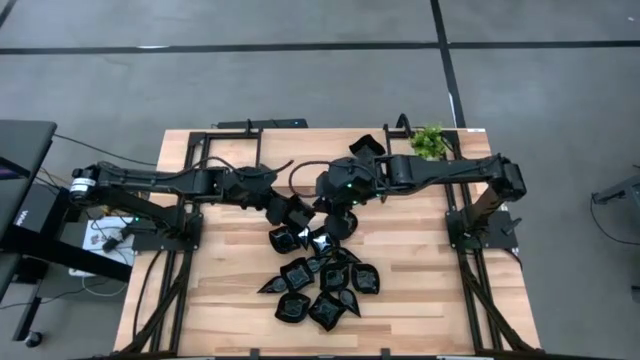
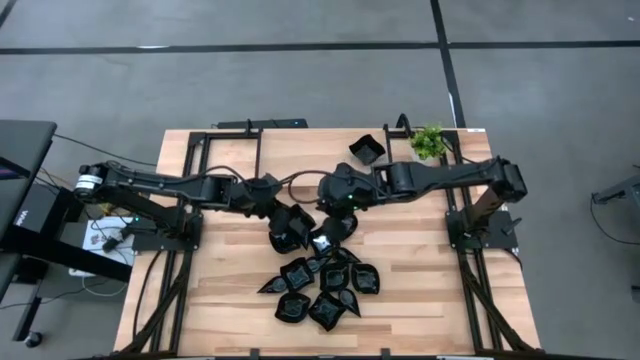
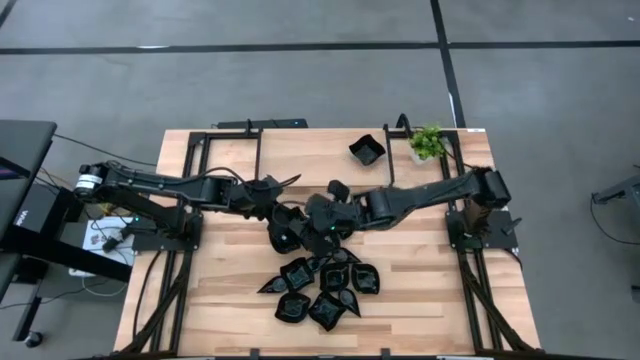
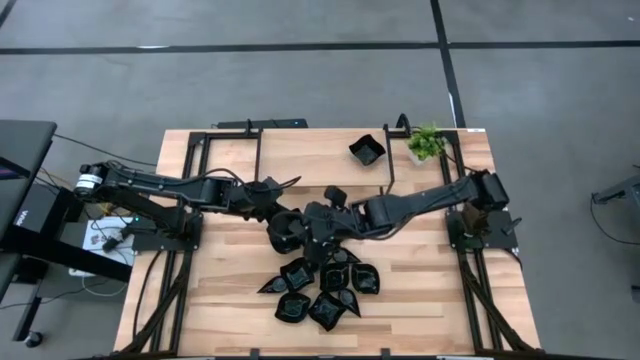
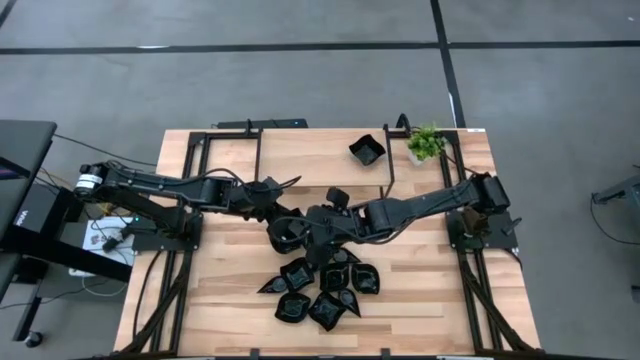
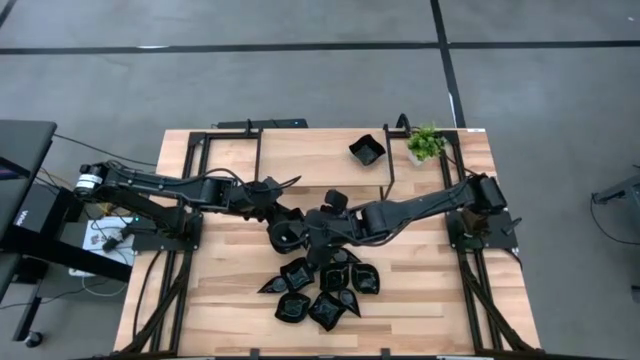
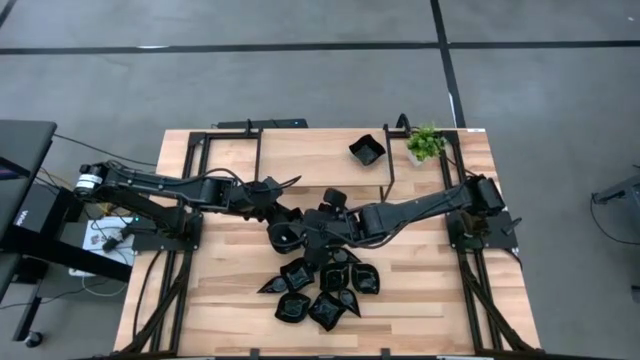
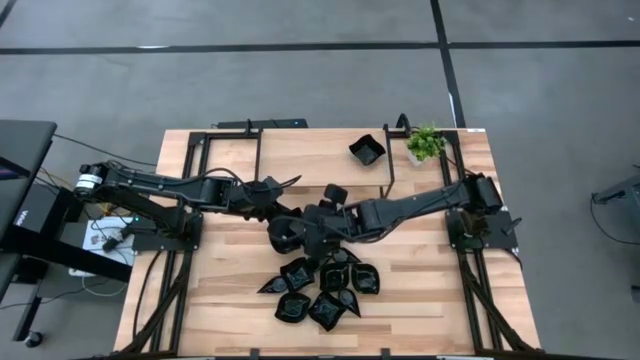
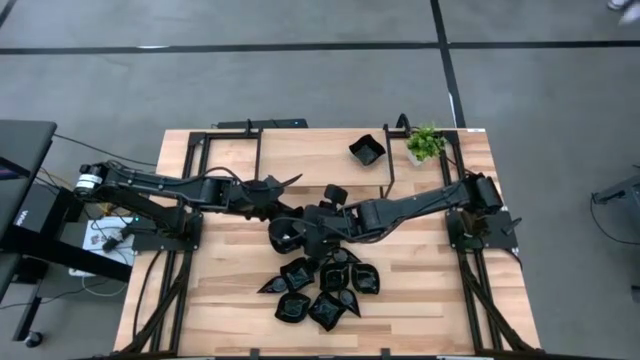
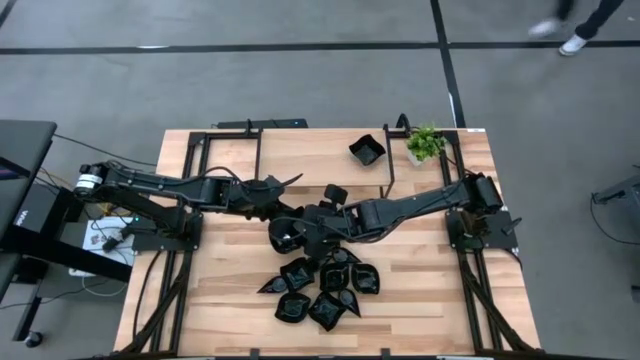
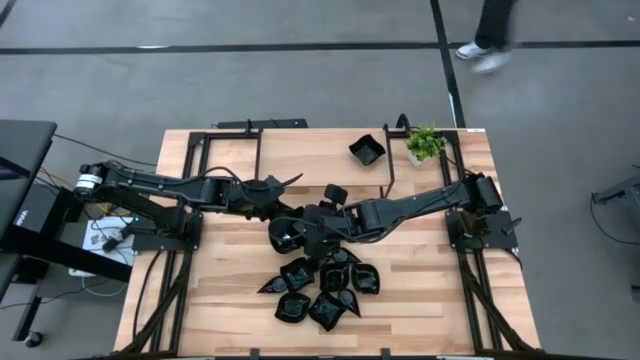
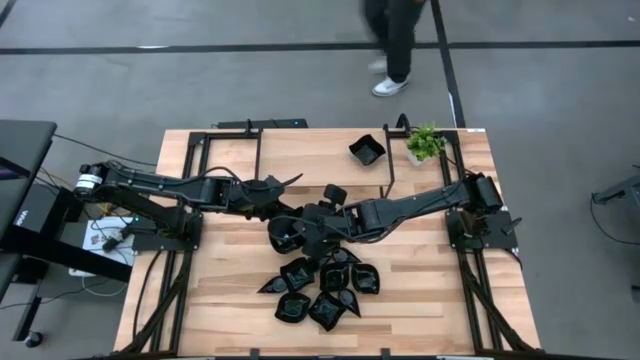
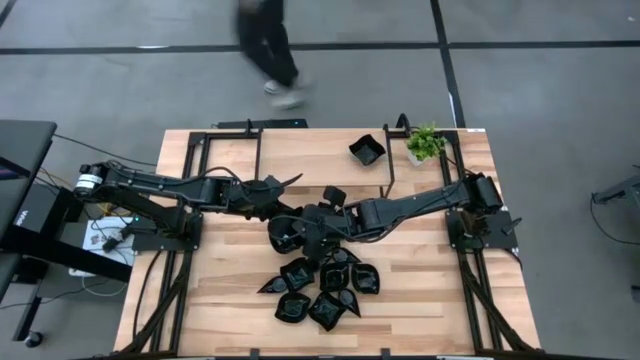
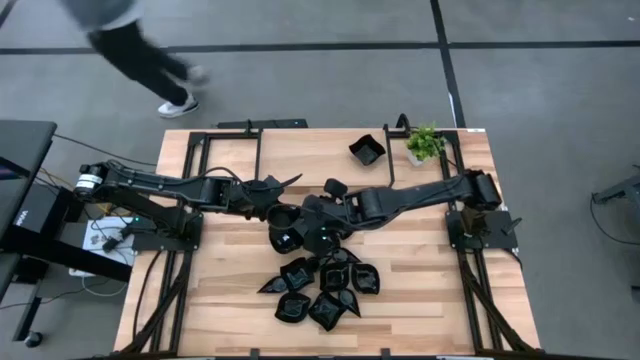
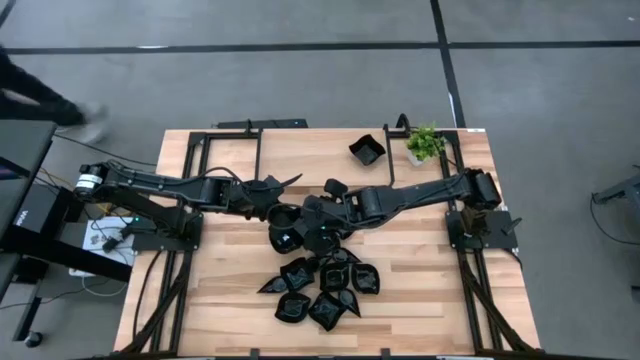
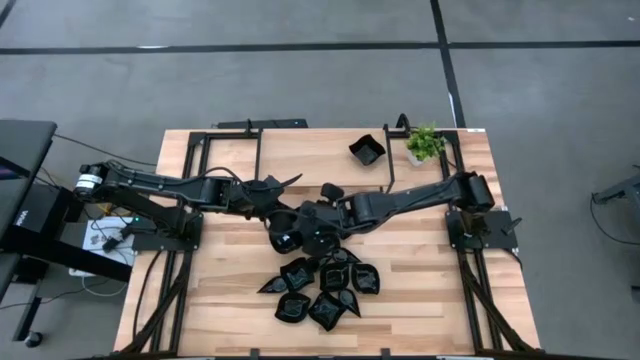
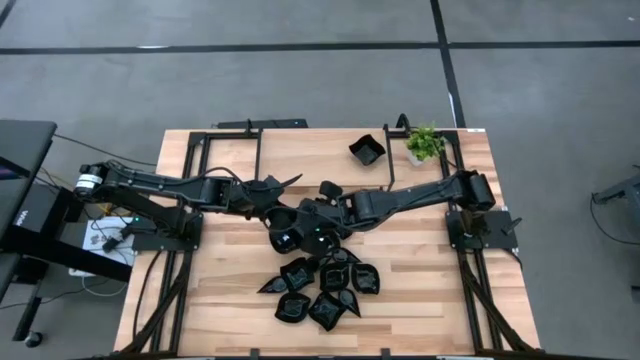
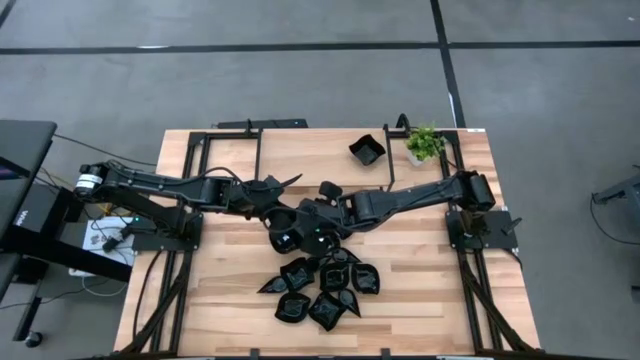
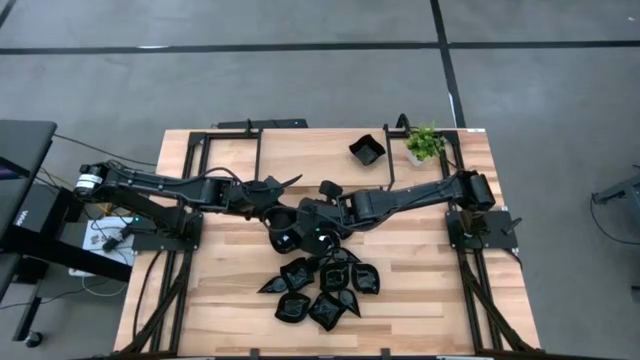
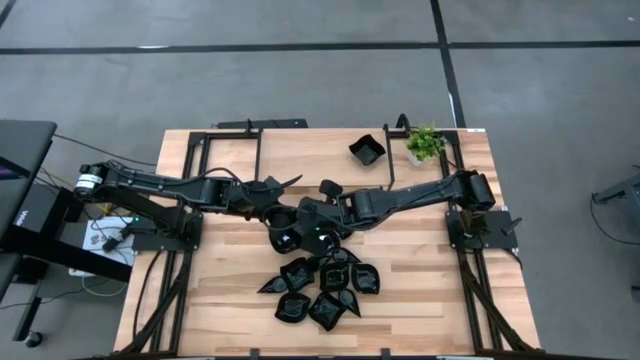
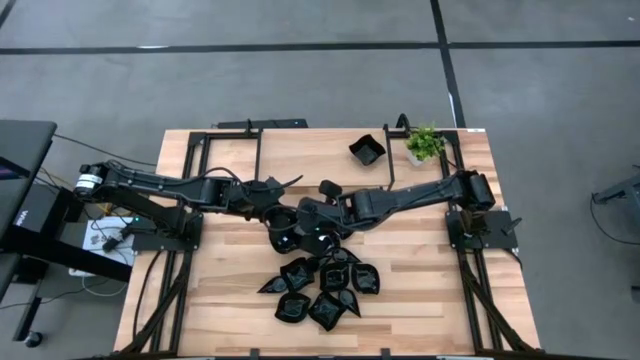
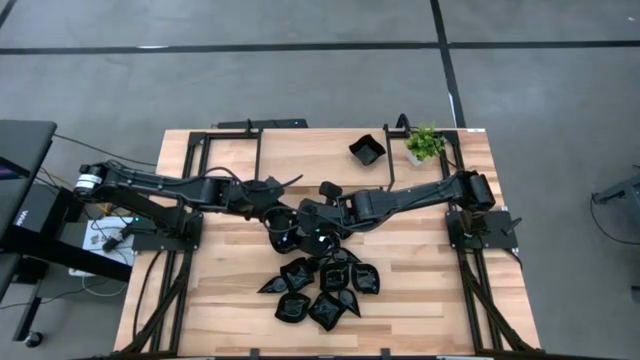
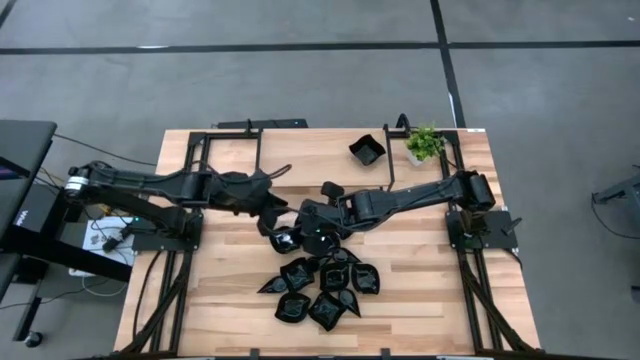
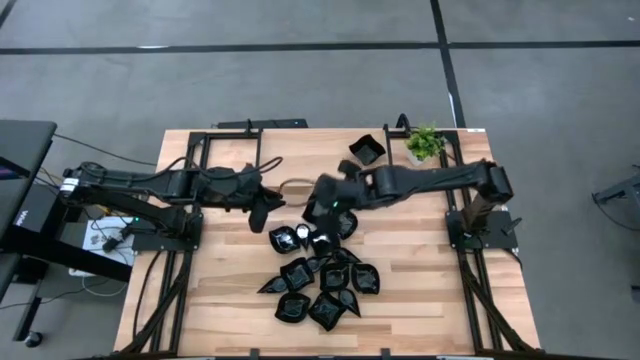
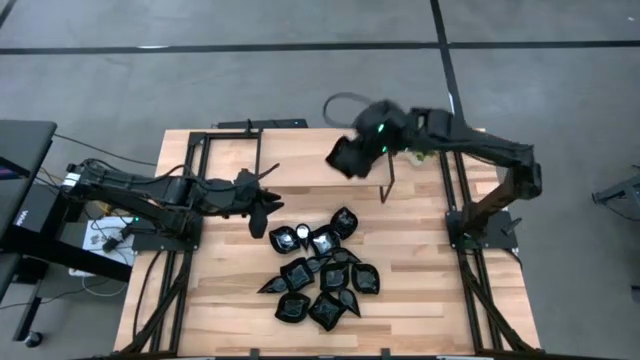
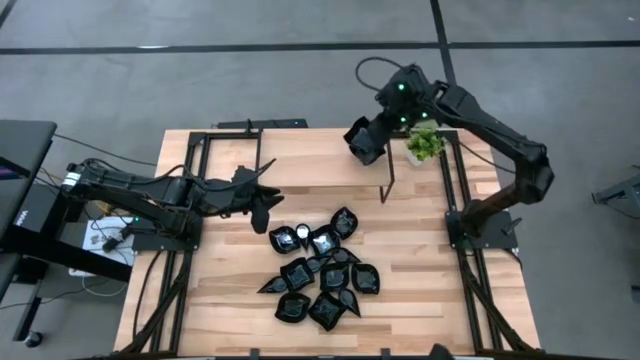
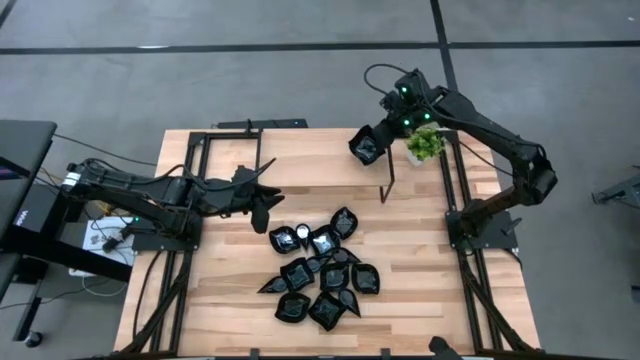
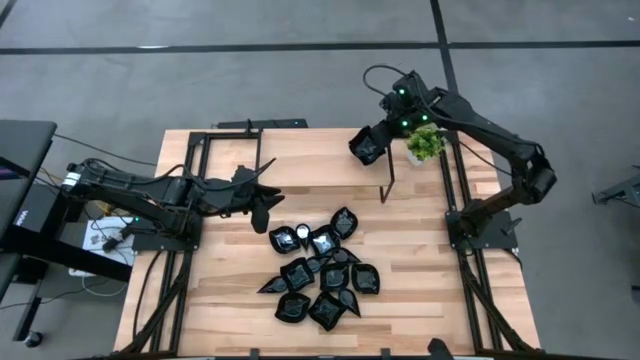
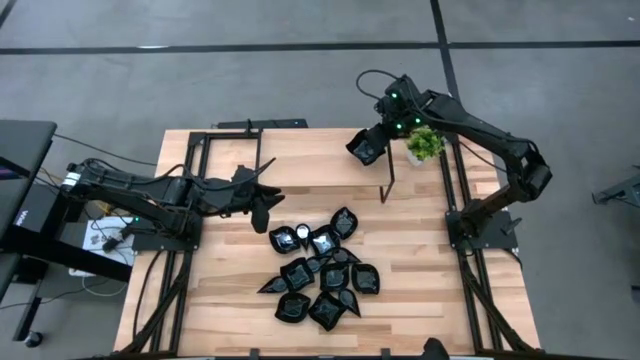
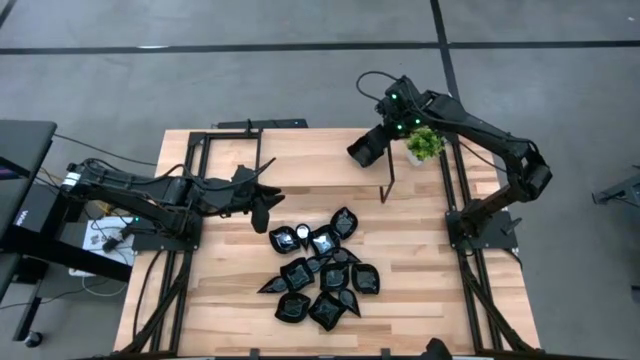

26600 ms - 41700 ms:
Task: Pick & Place Mini shaped plates
Stack the black distorted square plate on the black distorted square plate on the shelf

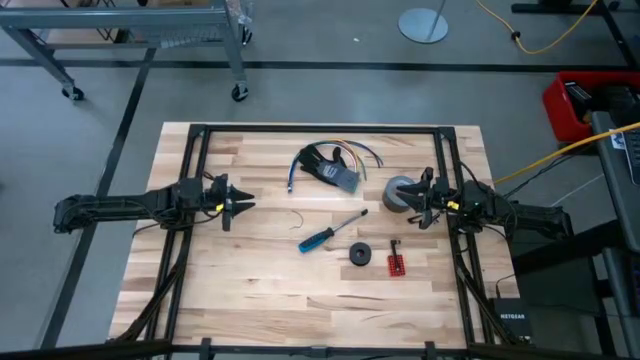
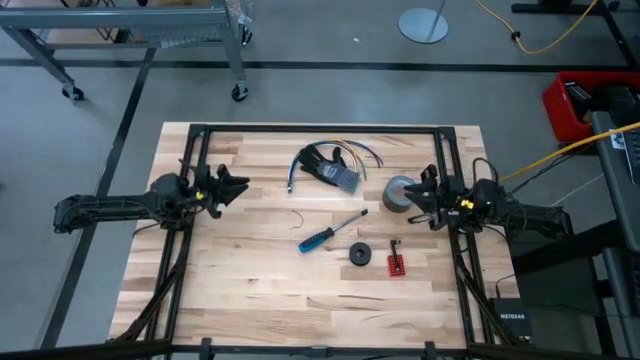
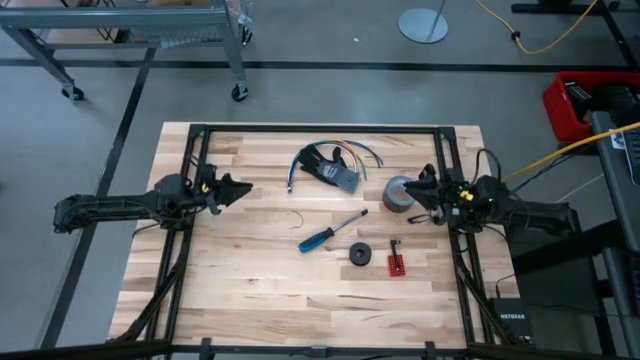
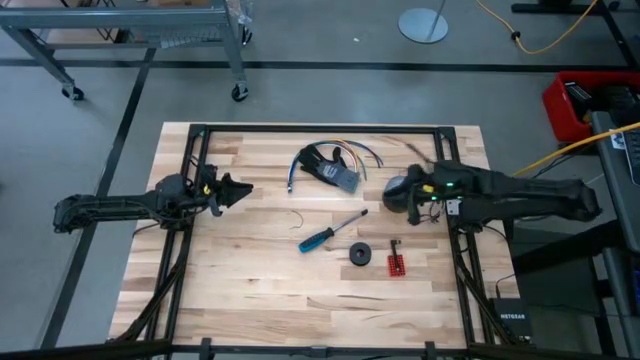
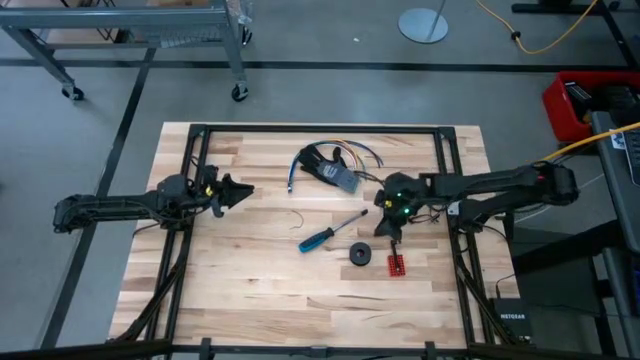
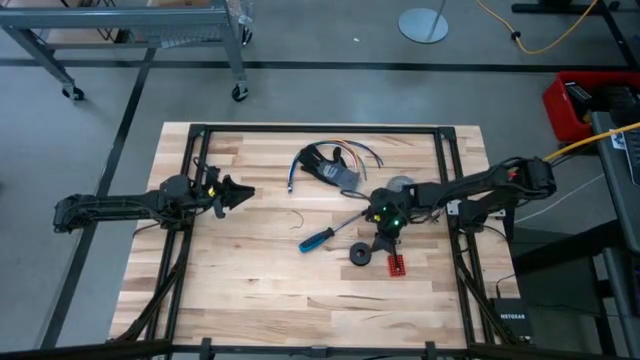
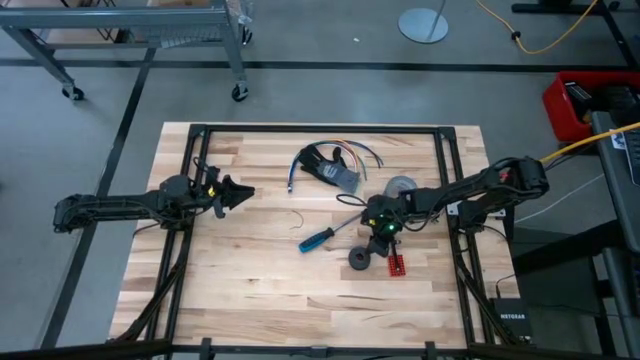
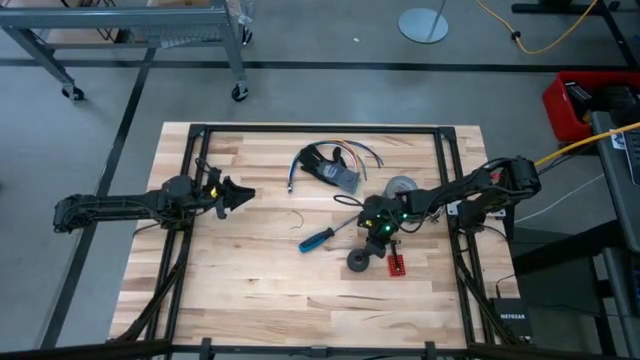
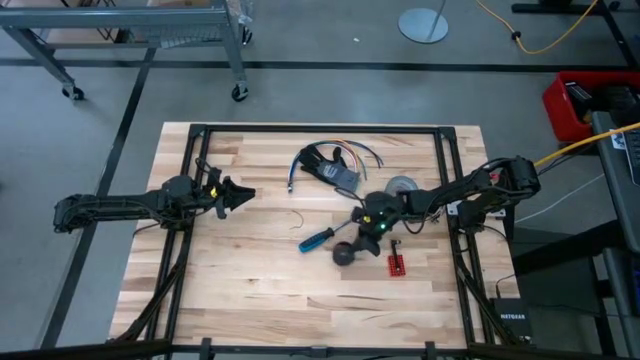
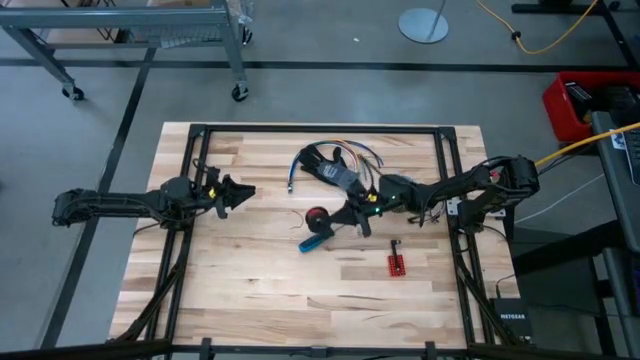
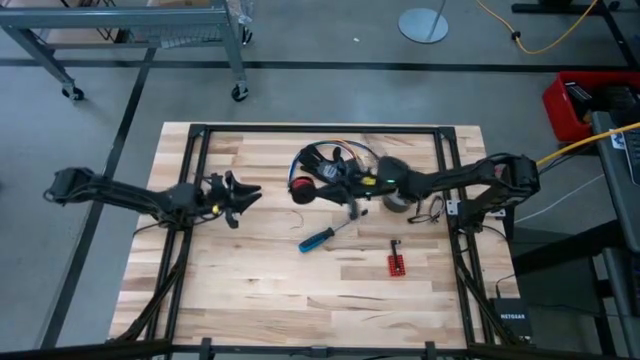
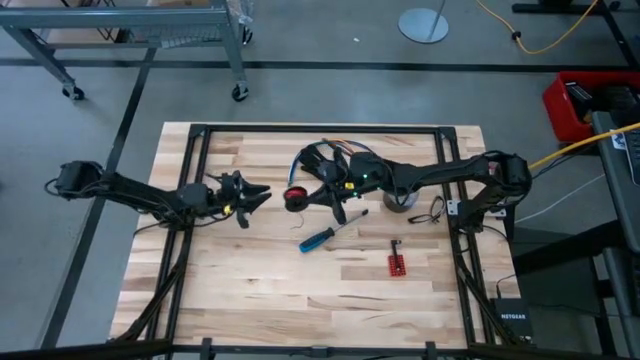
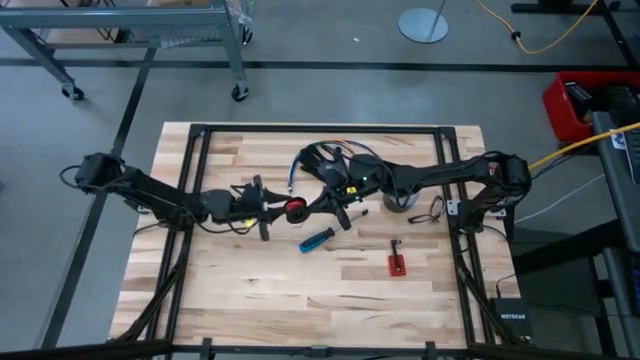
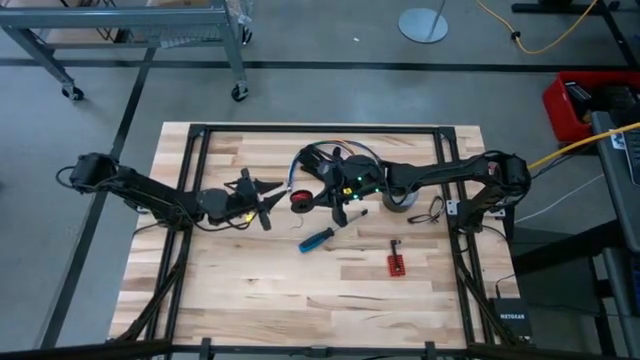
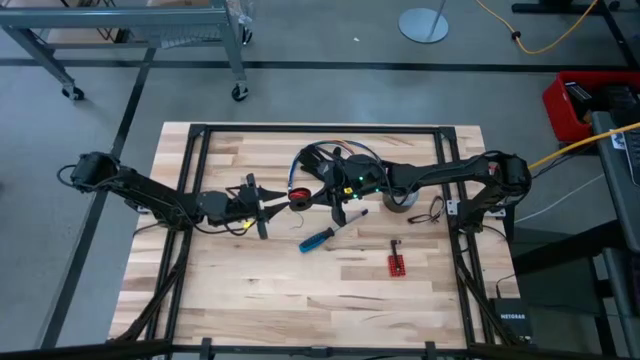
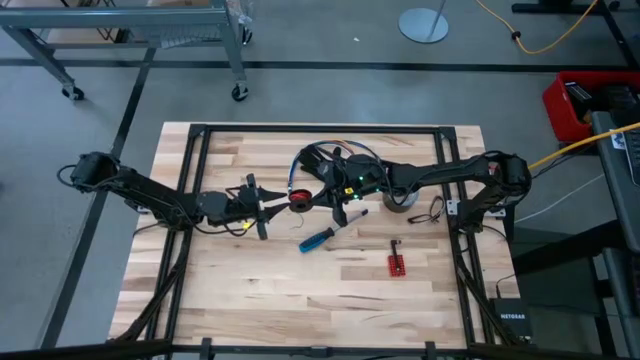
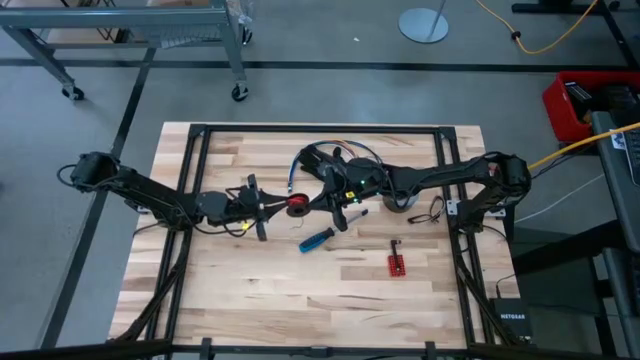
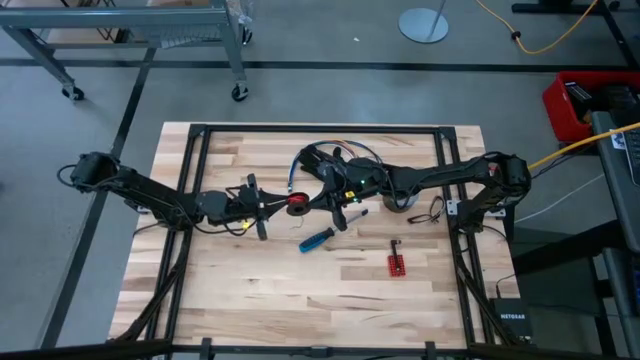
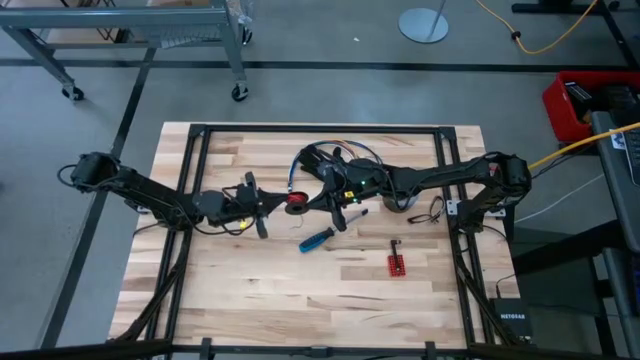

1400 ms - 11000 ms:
Task: Coil cords
Uncoil the red wire from the spool
